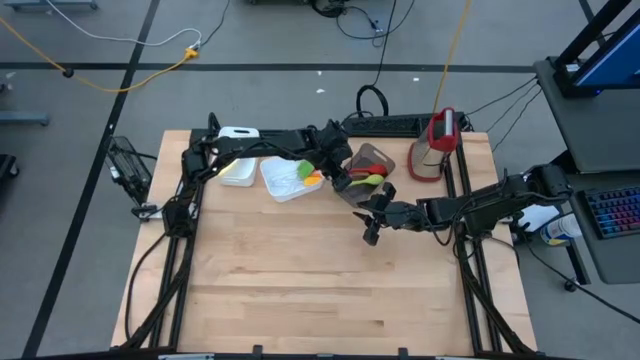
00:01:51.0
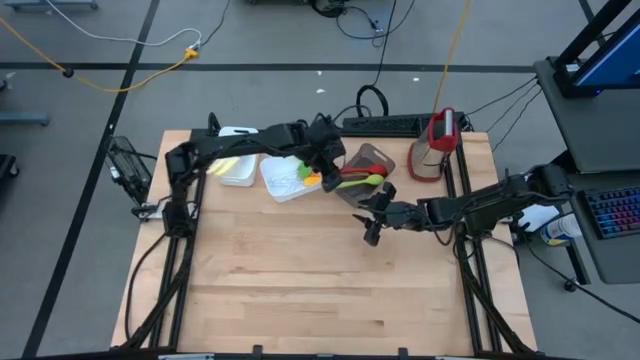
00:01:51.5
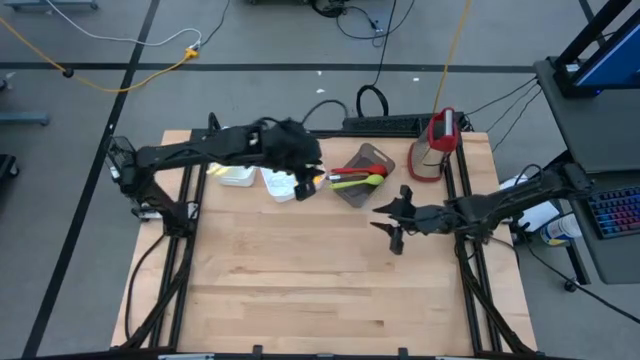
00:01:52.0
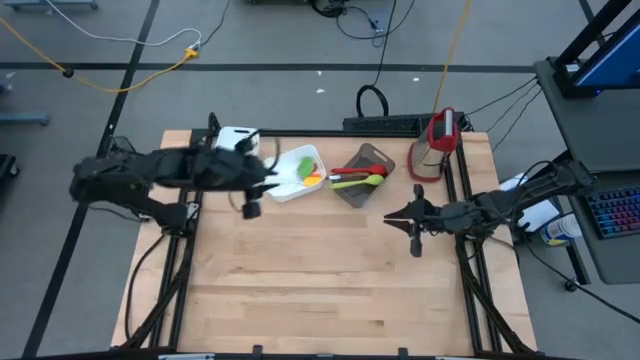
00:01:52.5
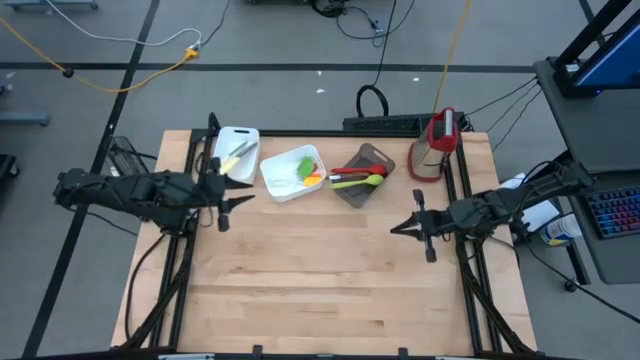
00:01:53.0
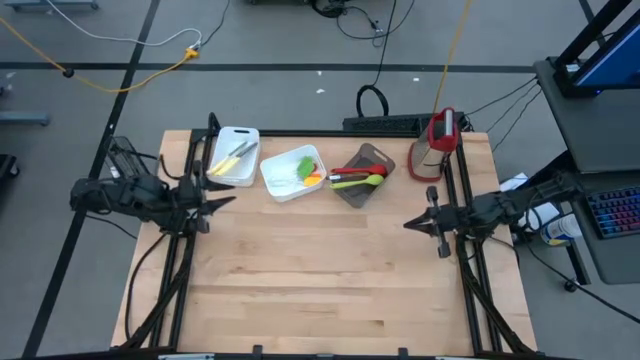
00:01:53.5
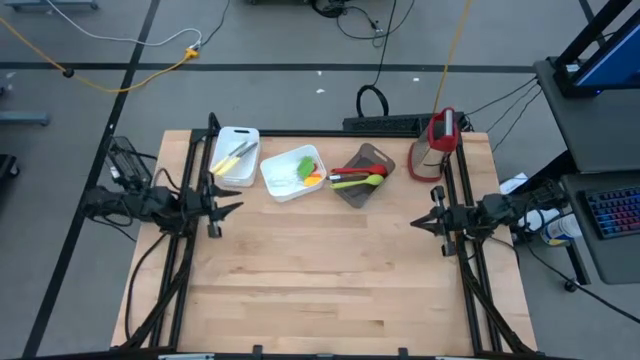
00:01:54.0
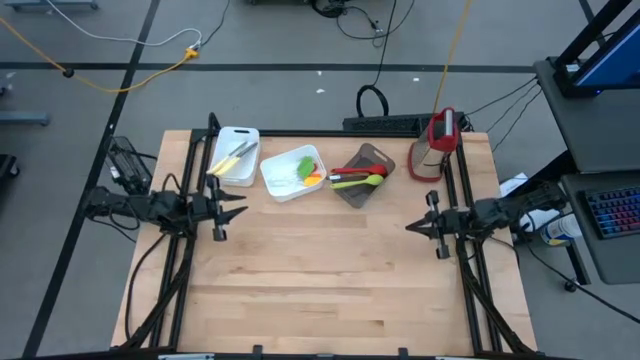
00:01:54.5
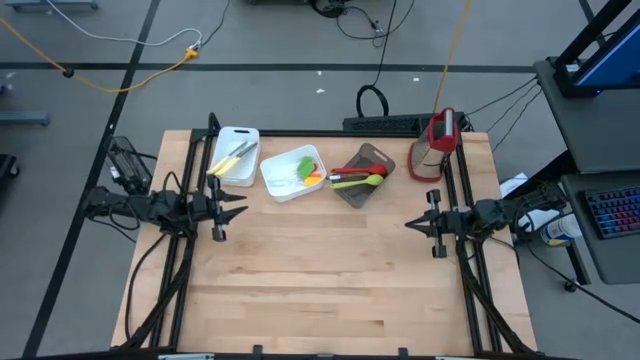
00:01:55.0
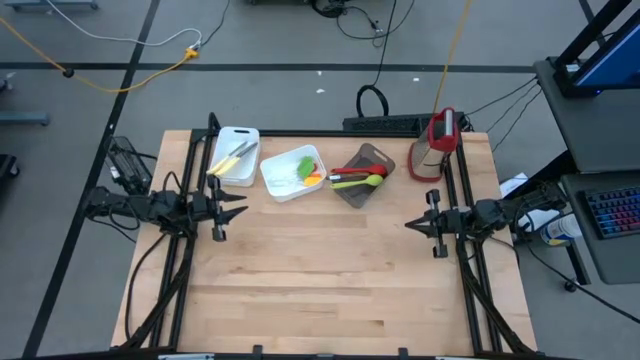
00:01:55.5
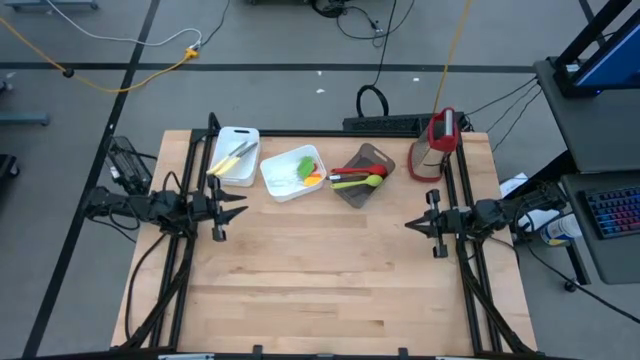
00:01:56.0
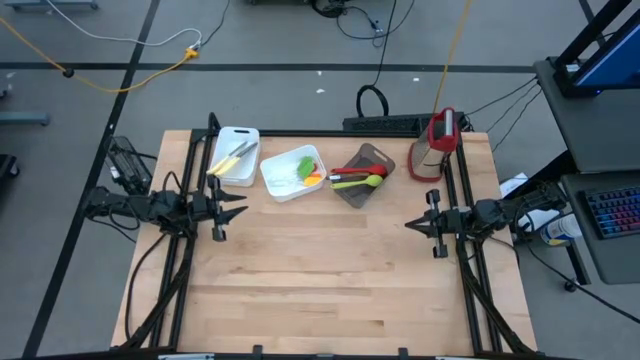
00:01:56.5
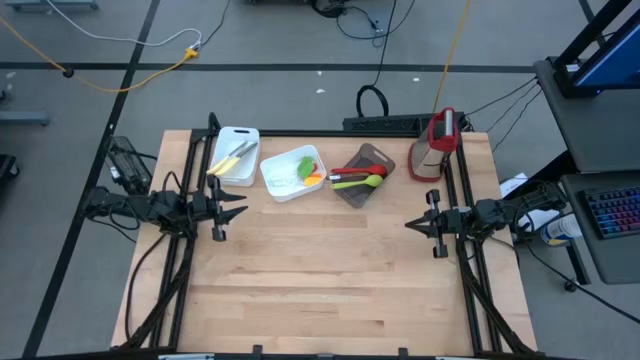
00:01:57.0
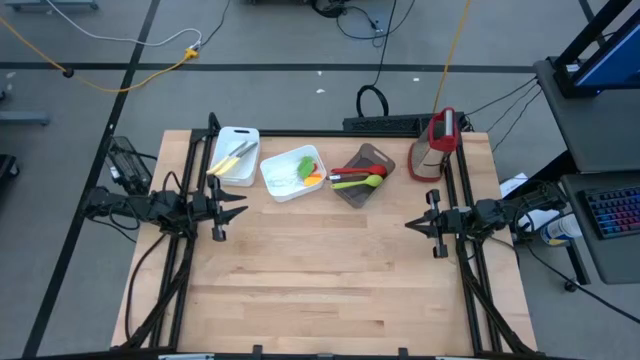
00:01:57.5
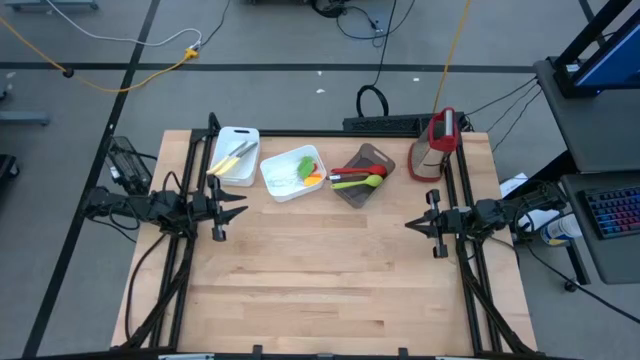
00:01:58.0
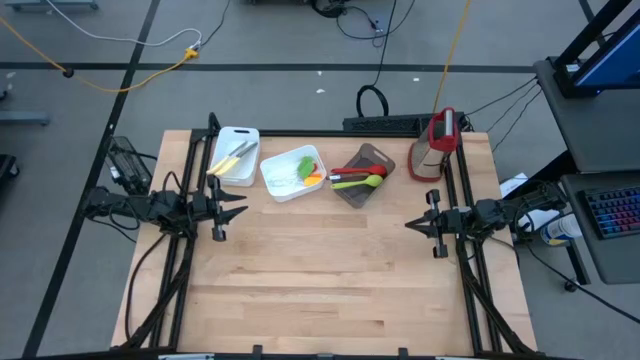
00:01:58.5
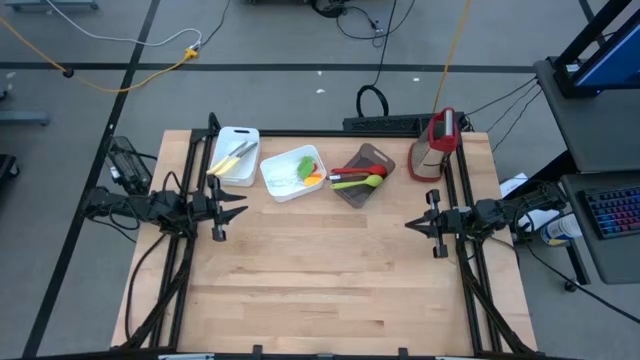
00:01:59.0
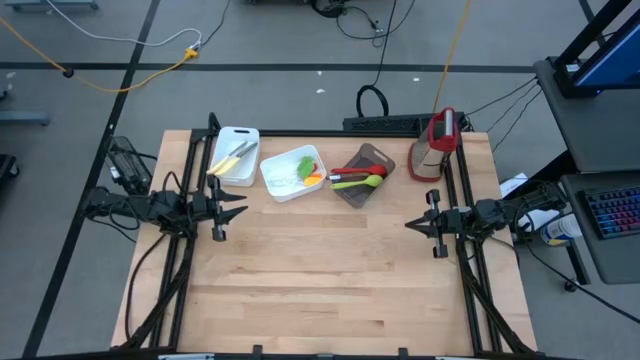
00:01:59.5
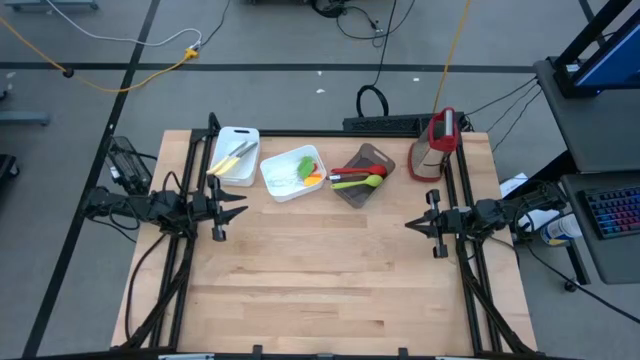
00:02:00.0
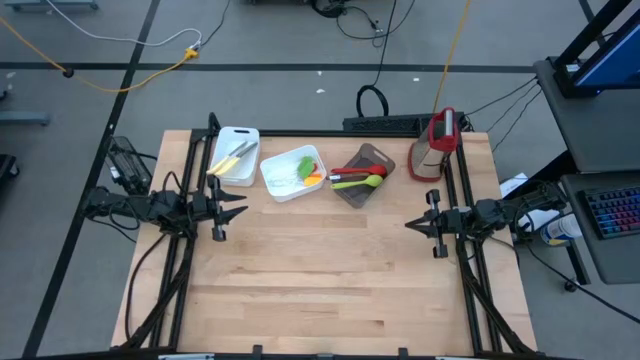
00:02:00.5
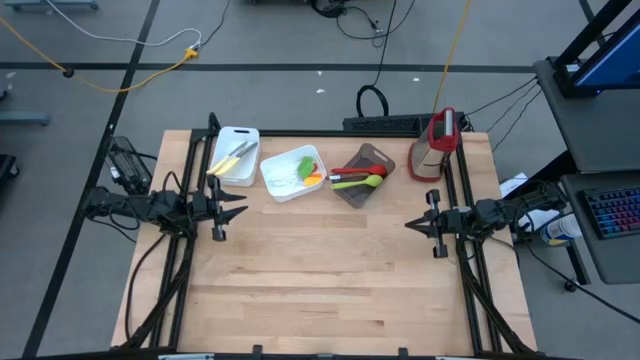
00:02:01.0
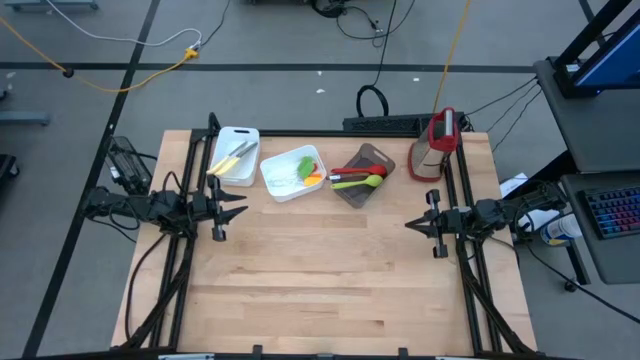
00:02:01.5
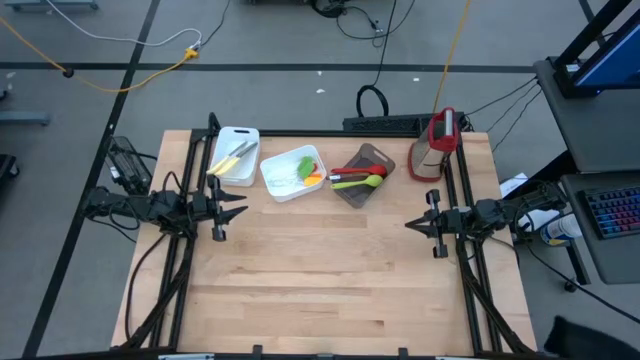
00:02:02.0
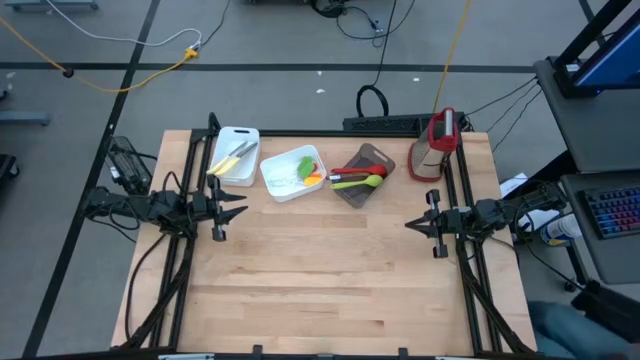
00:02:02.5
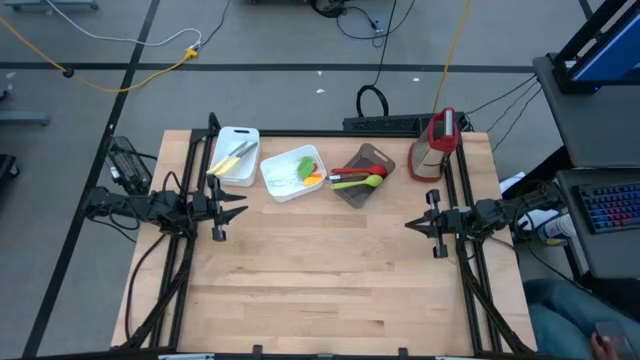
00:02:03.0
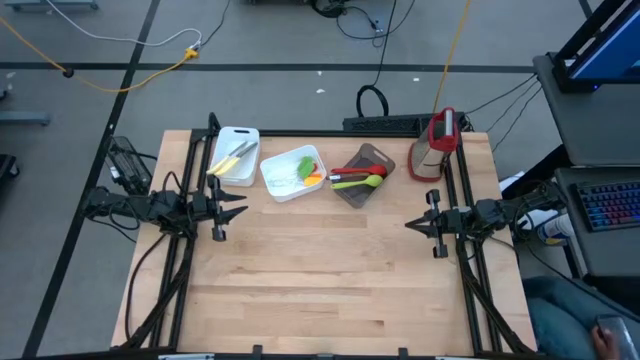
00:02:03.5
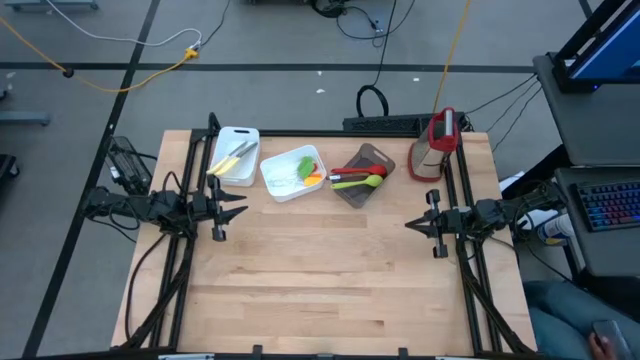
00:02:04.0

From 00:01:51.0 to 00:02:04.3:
Task: Pick & Place Kitchen Items
Return to Home Position

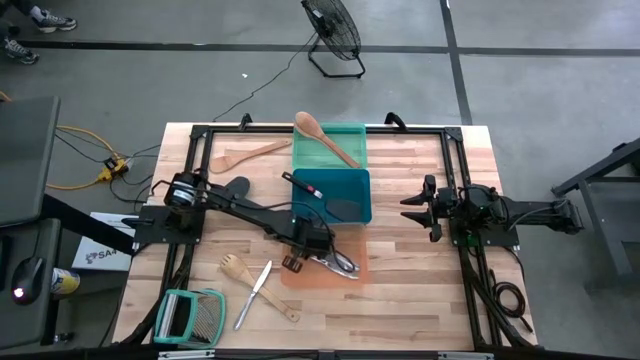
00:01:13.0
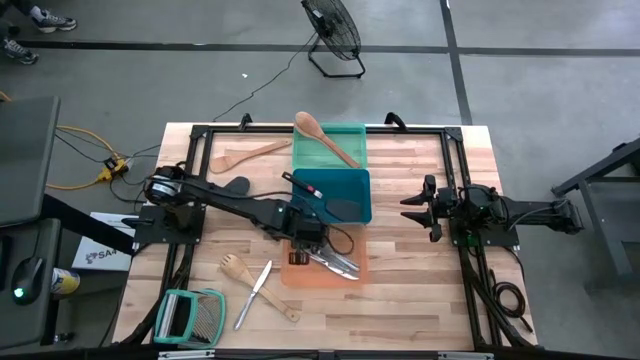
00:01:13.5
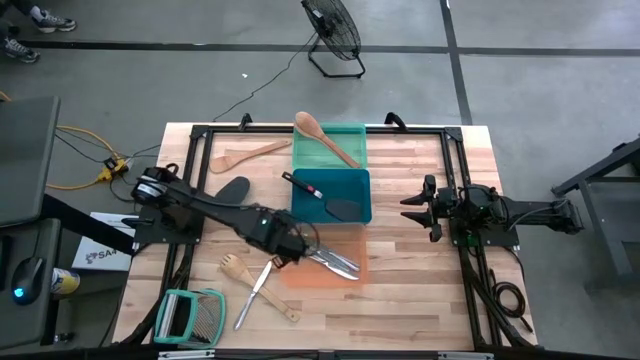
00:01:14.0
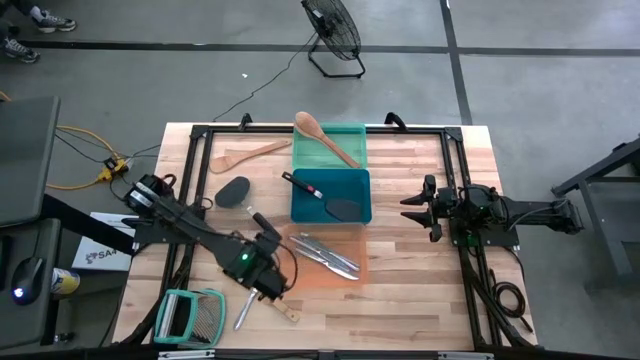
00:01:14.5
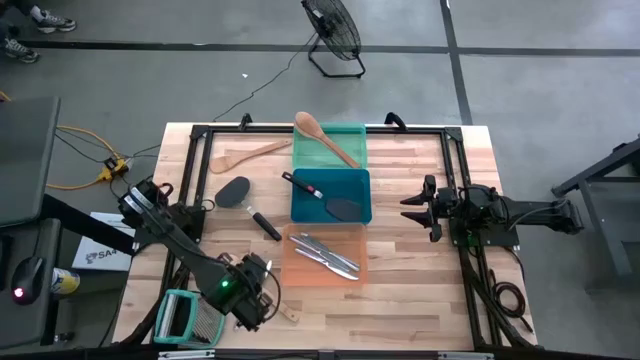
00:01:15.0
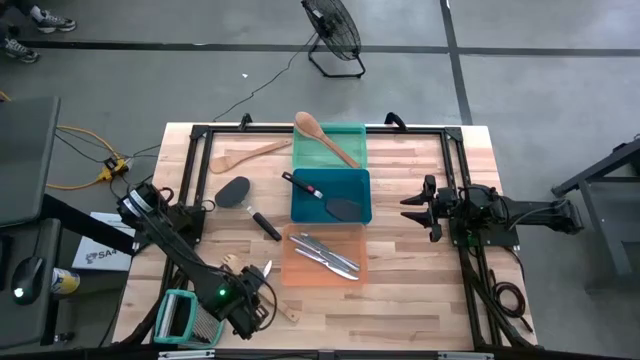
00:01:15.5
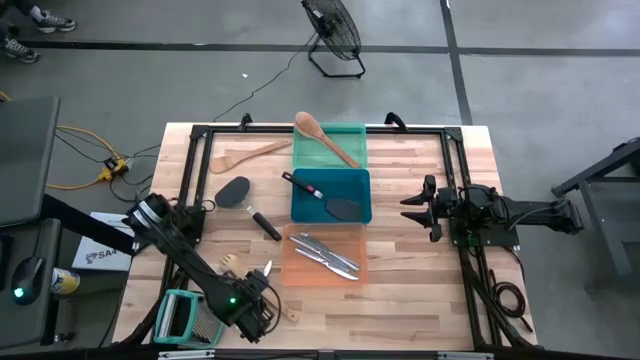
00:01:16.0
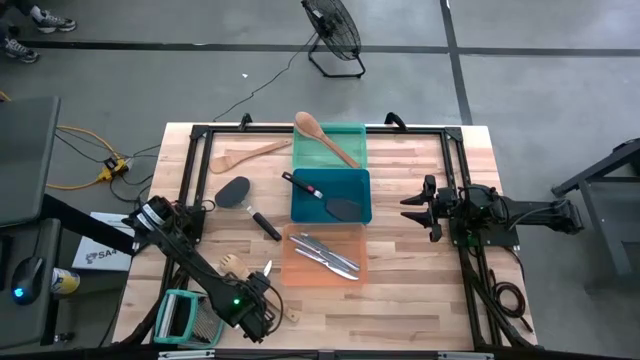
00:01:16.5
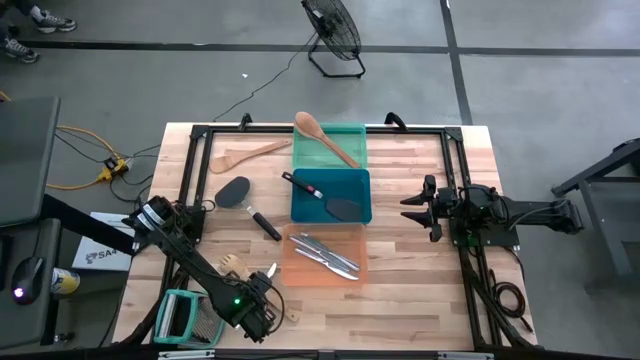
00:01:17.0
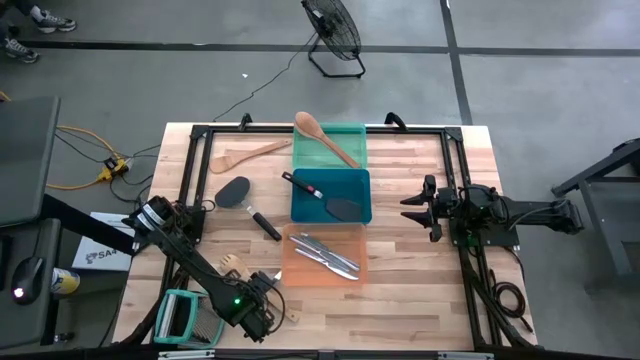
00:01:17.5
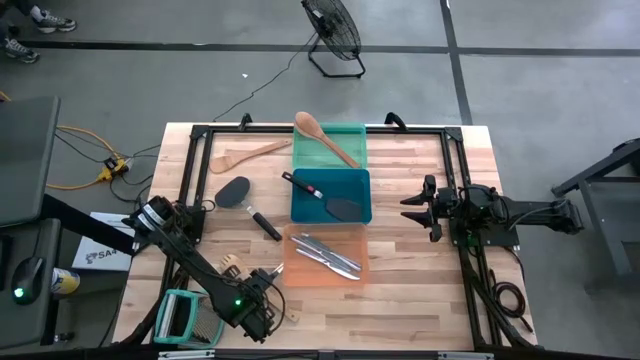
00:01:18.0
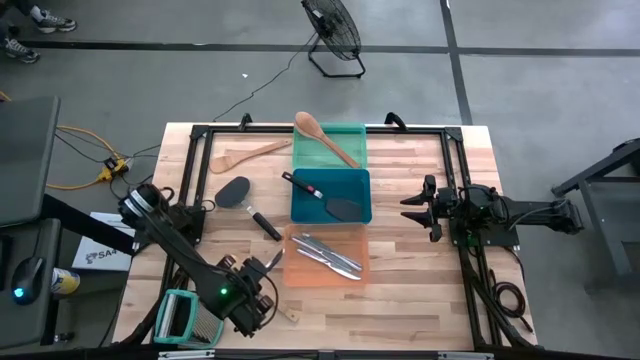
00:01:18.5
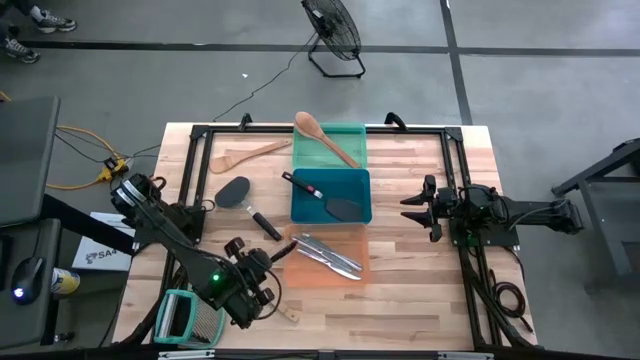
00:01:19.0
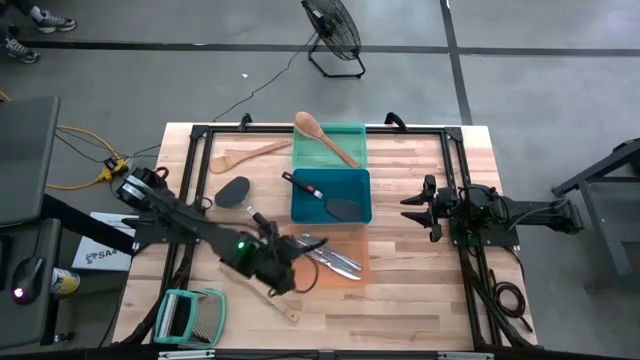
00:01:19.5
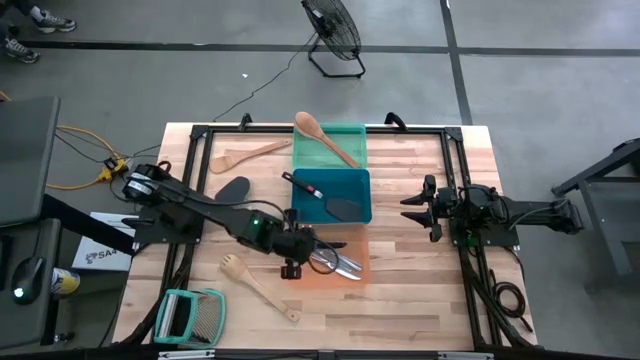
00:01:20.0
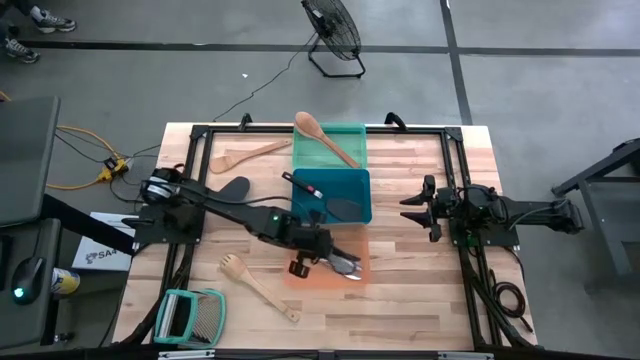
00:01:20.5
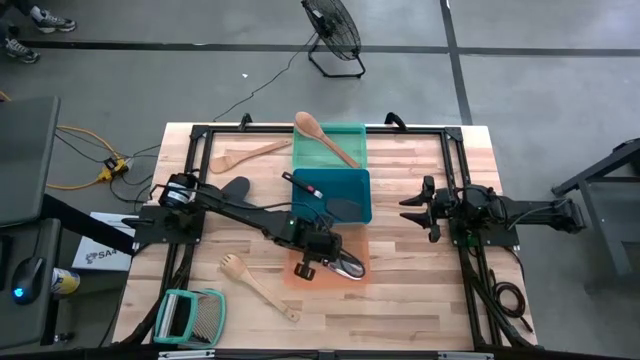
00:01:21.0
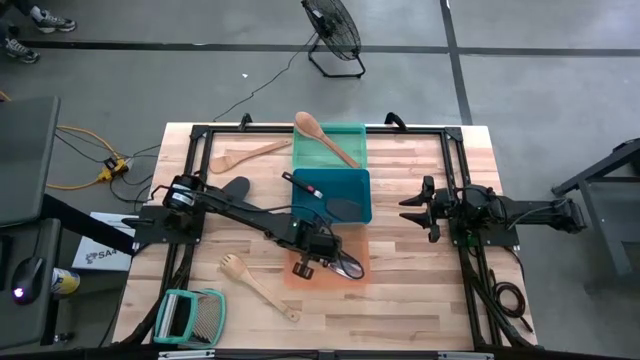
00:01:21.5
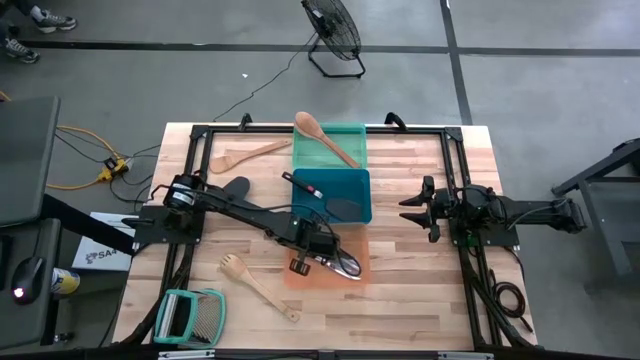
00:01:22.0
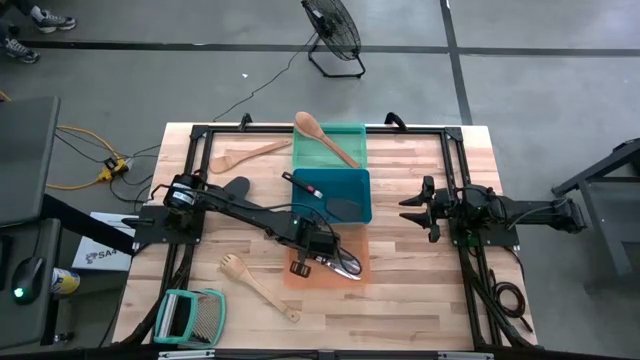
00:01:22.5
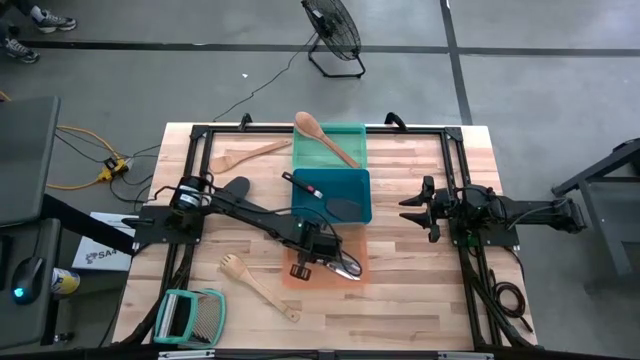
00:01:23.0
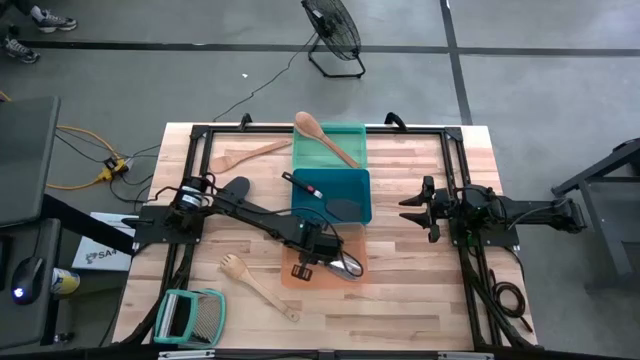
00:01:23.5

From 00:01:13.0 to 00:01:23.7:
Task: Pick & Place Kitchen Items
Put the silver knife into the orange bin
